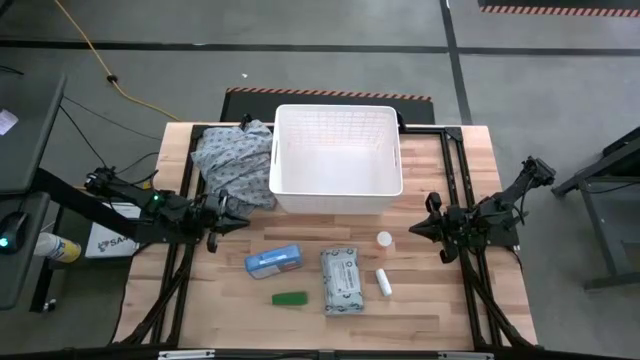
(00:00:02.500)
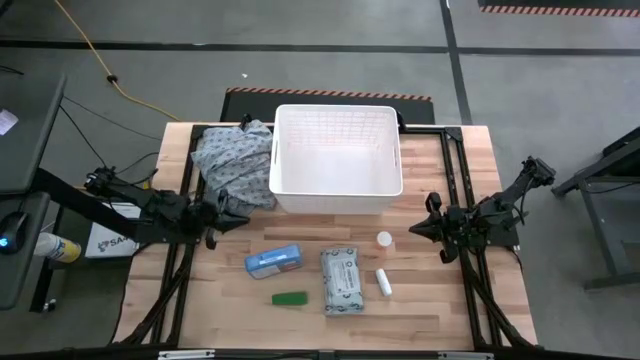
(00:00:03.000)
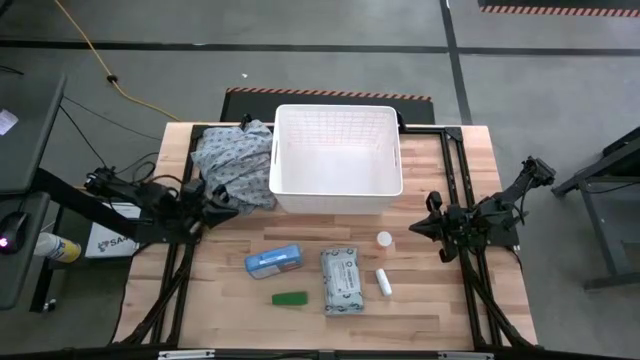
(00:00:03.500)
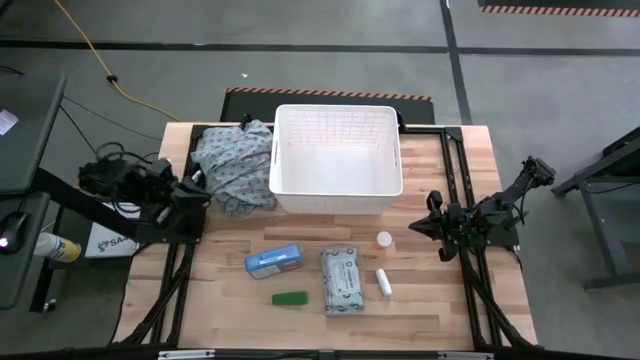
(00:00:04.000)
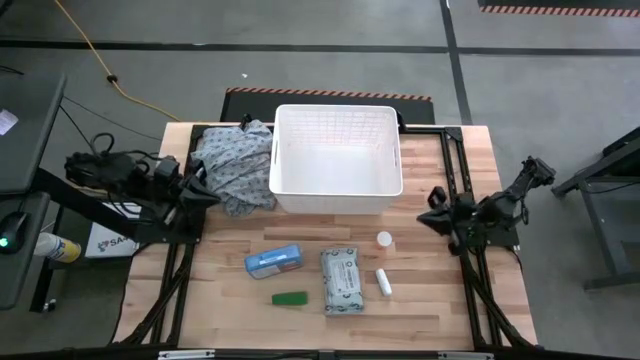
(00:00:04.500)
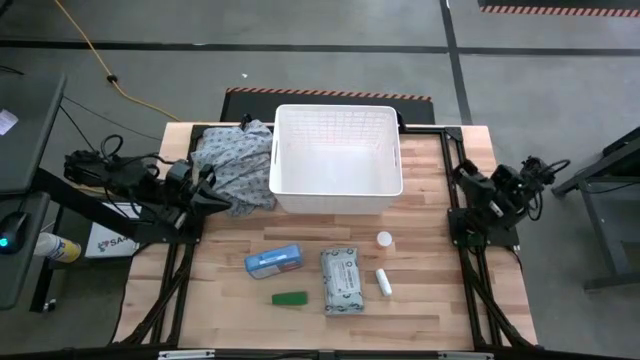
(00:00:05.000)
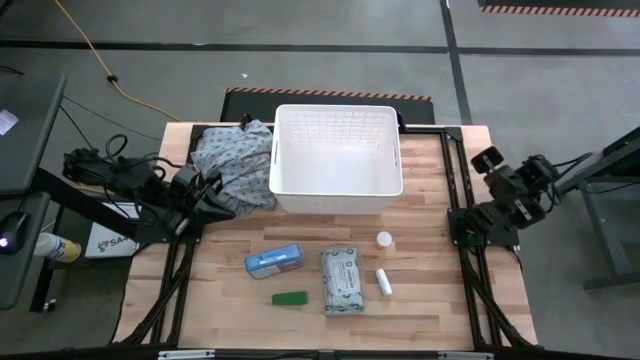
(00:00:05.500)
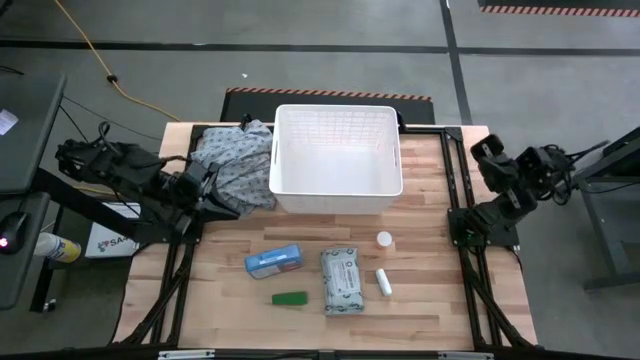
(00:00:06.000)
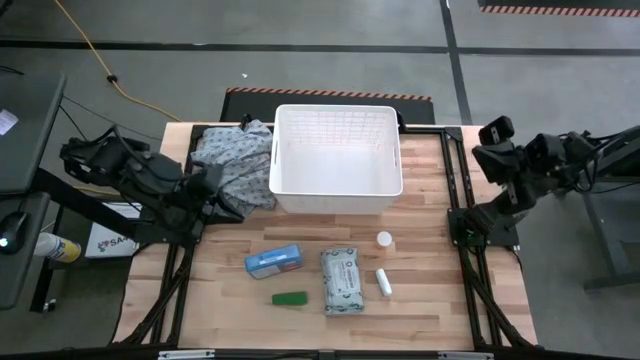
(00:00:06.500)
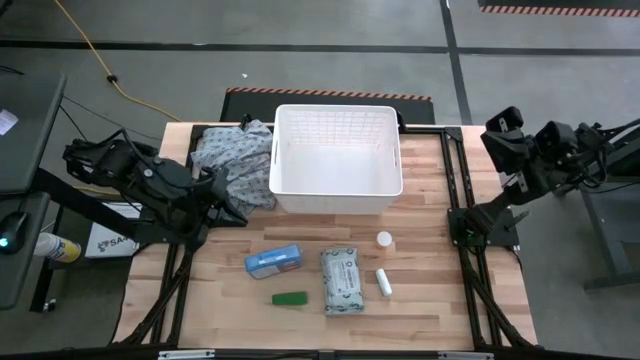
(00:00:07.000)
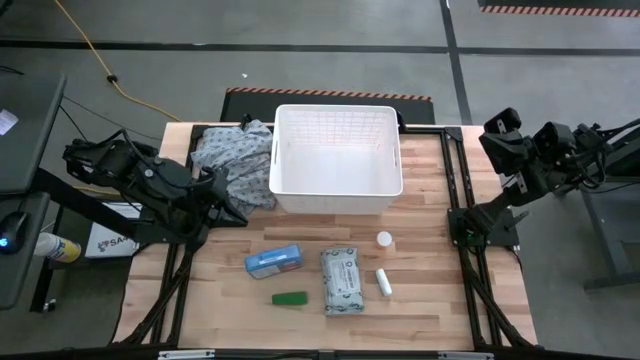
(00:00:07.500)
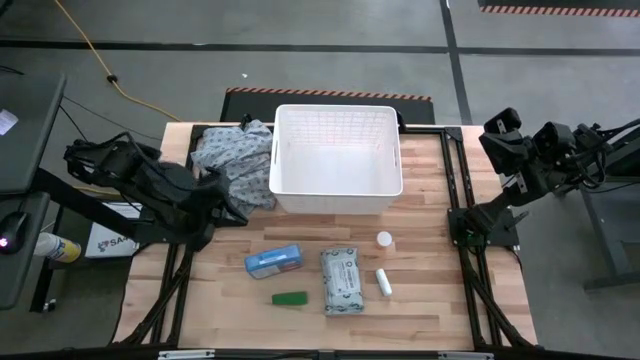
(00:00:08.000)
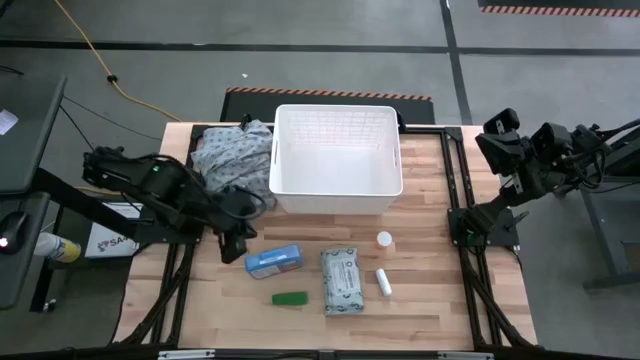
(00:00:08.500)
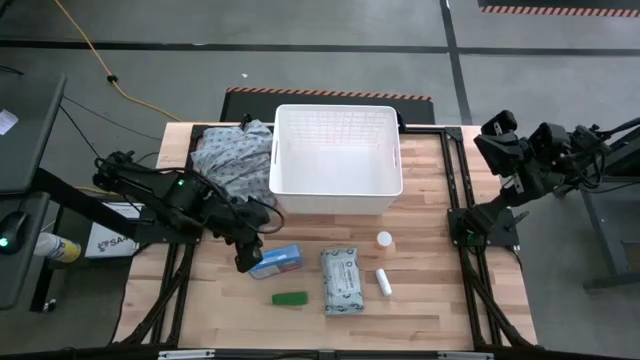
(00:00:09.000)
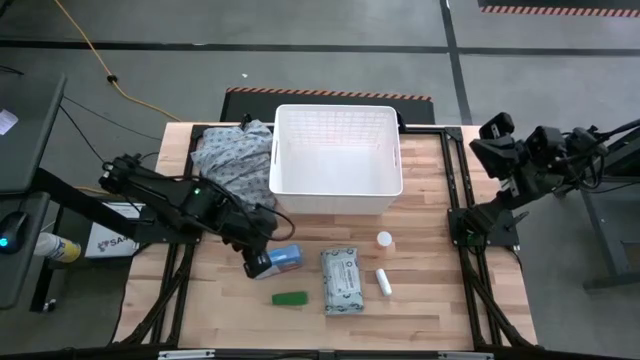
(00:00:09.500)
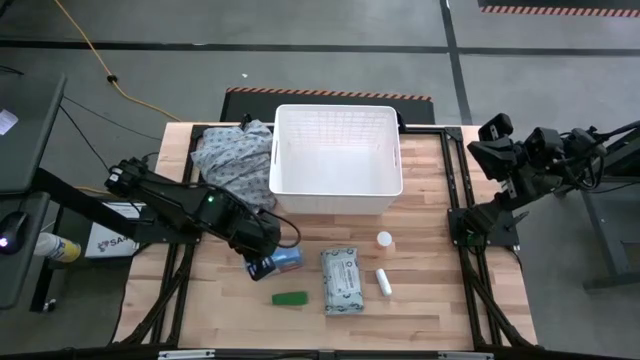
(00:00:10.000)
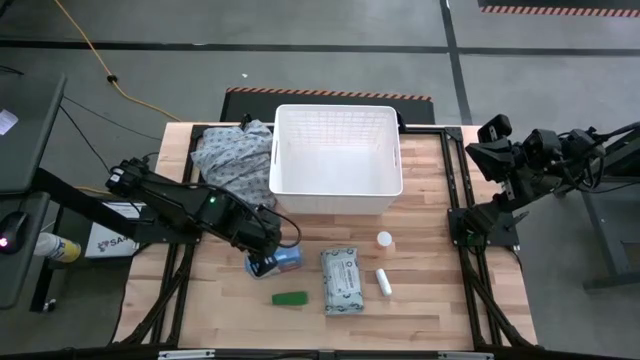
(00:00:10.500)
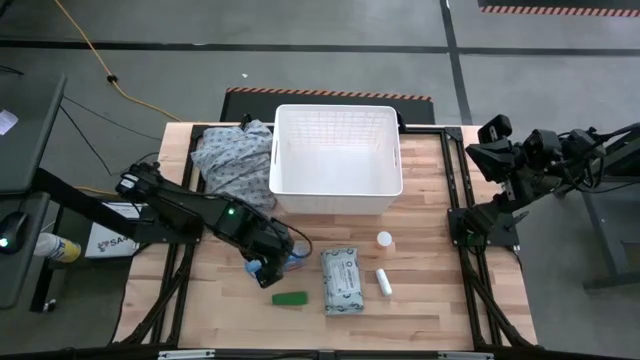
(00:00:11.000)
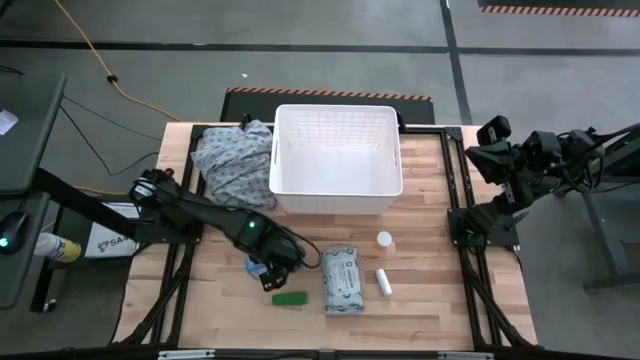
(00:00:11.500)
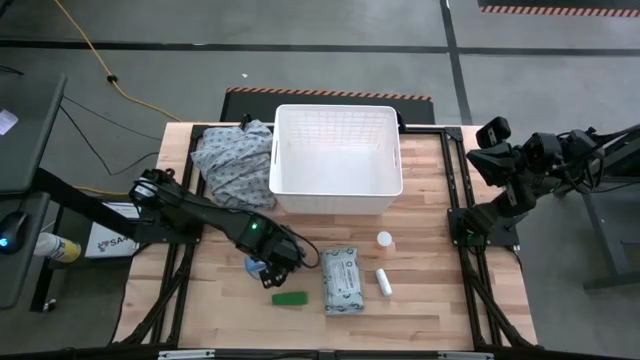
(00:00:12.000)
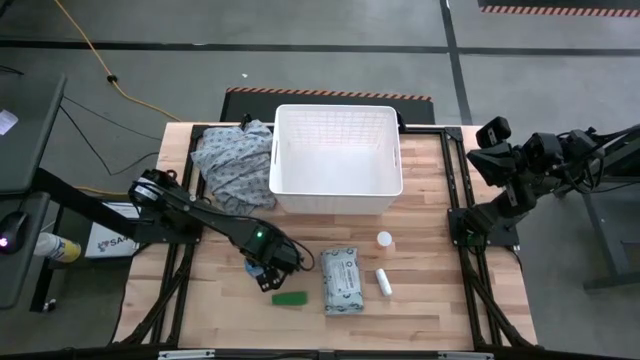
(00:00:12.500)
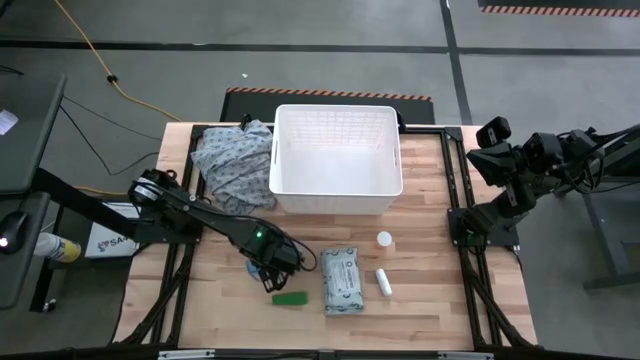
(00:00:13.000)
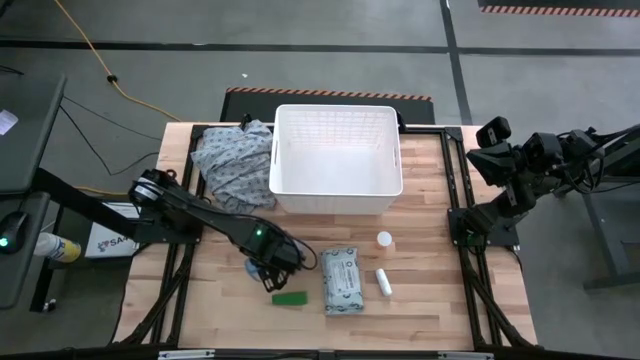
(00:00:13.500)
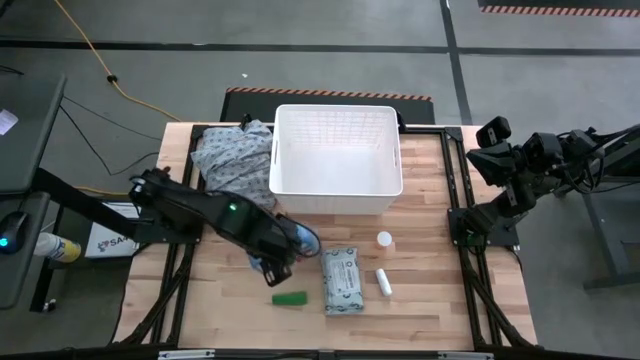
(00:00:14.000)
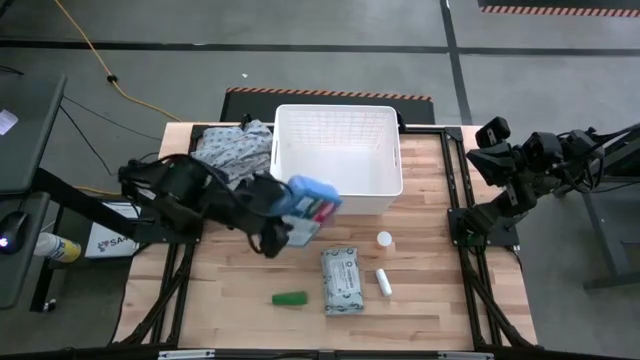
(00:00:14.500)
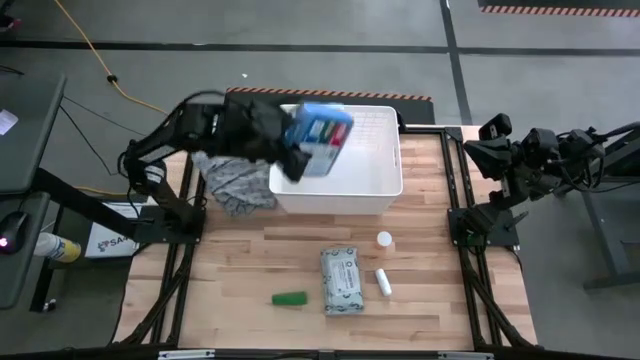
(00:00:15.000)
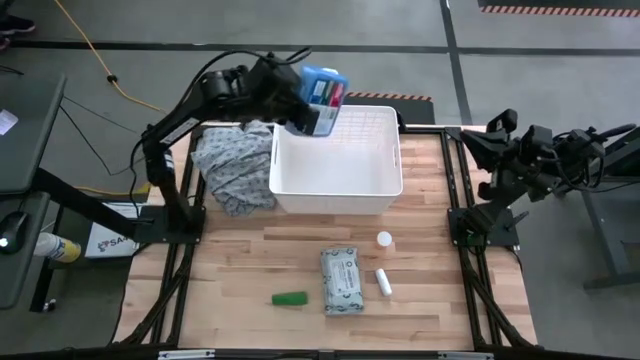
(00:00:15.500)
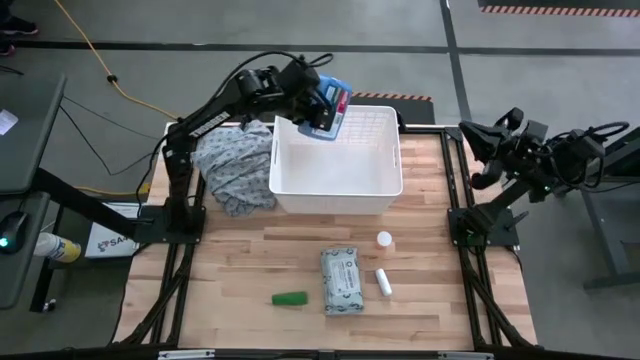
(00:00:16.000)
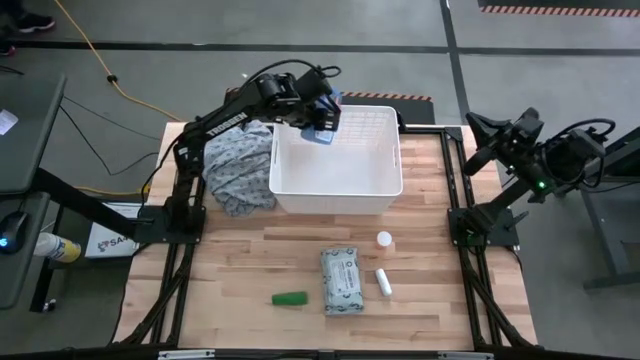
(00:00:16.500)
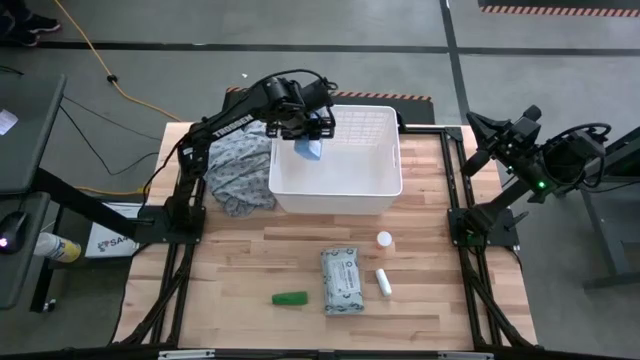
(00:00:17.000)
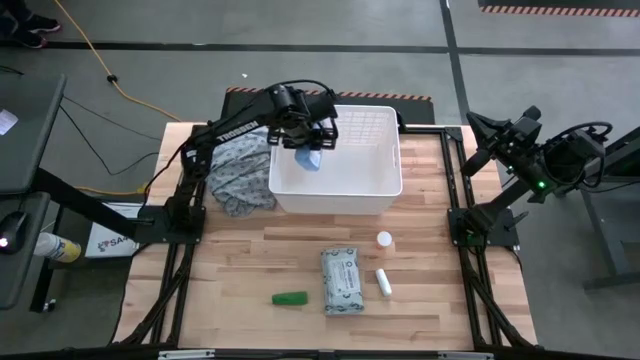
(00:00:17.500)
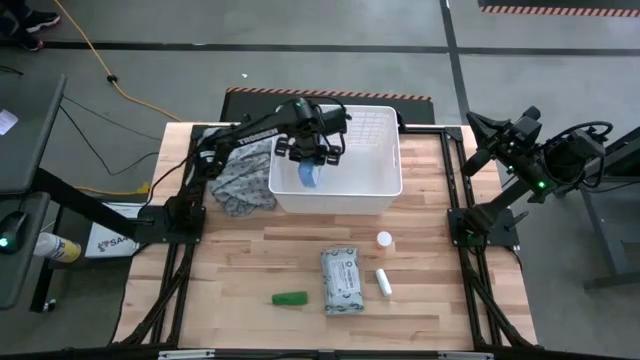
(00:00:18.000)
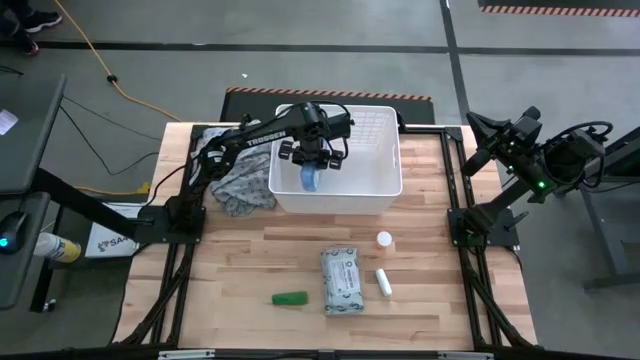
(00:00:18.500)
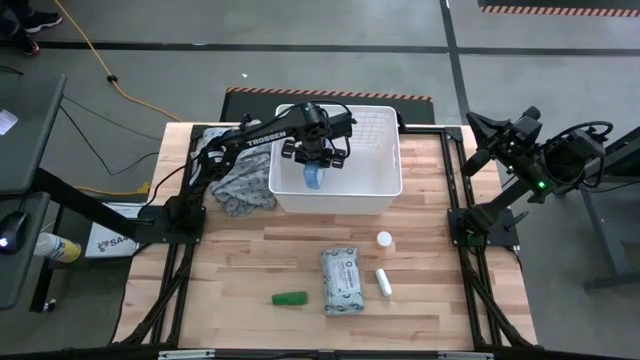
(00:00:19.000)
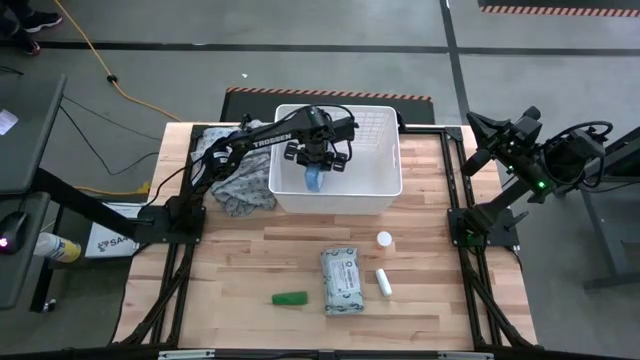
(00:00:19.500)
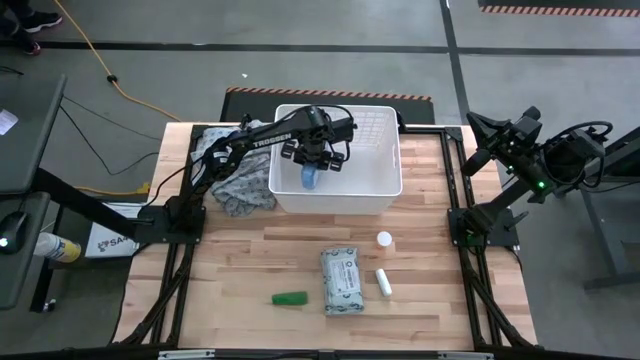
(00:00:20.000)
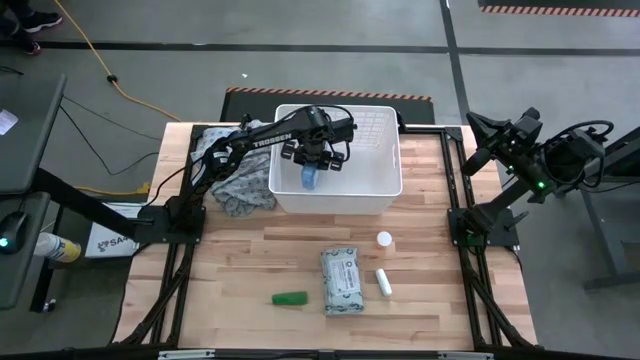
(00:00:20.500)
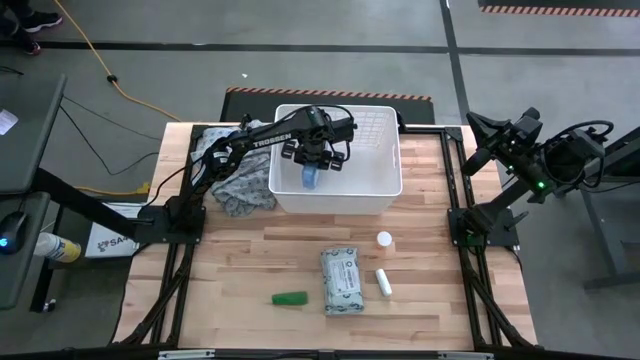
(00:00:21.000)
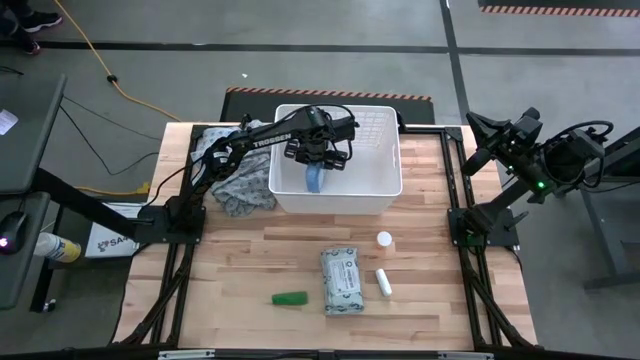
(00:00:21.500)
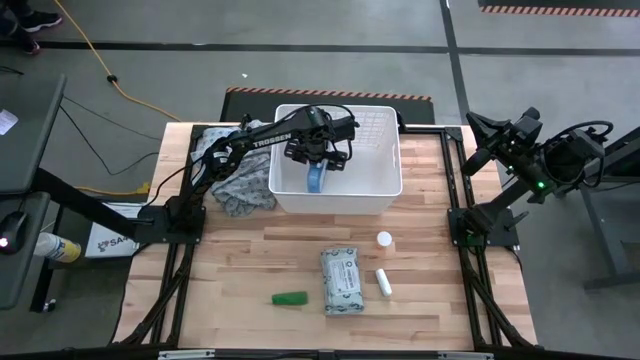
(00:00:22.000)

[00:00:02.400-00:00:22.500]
Task: Pick & place medical supplies in basket/bin
Put the blue first aid kit into the white bin
